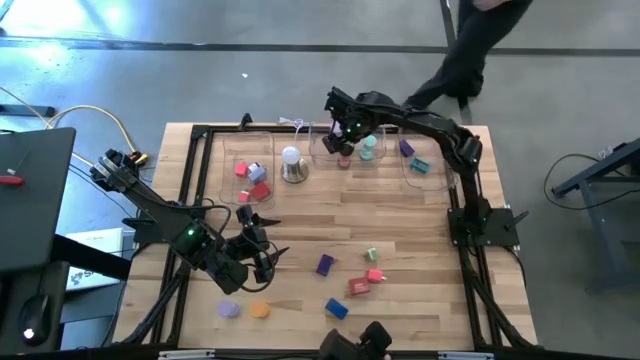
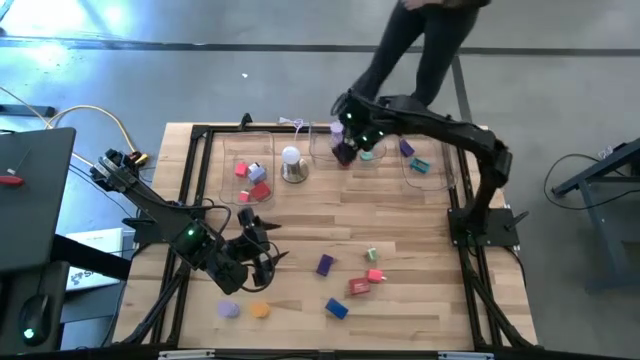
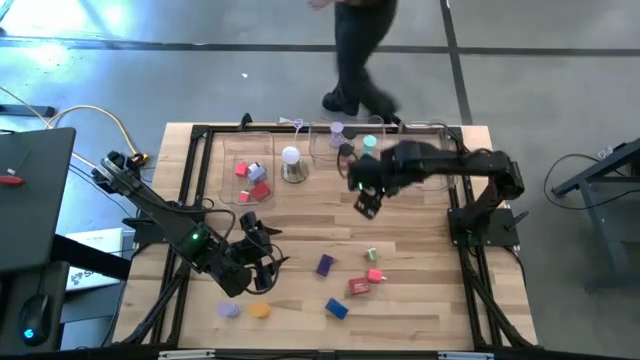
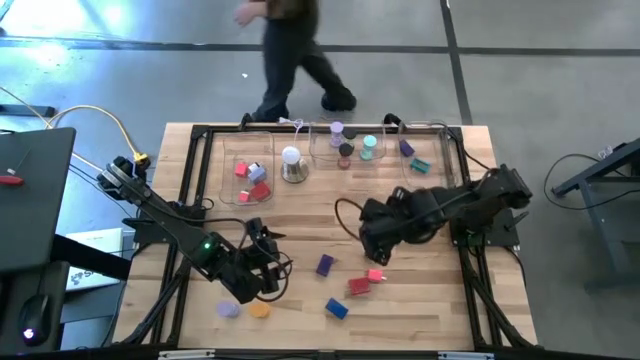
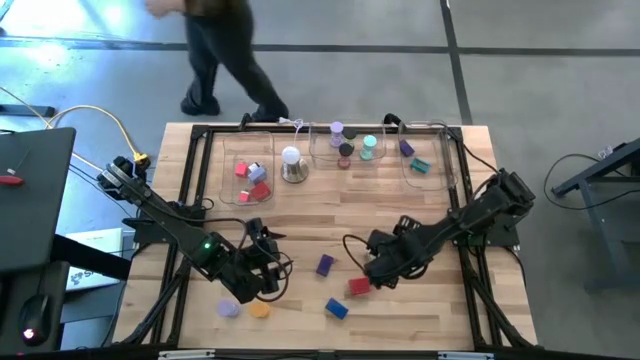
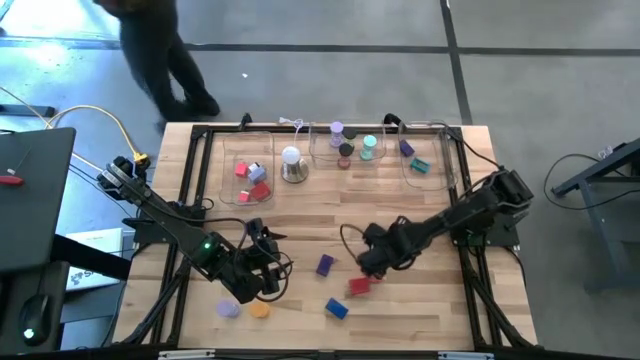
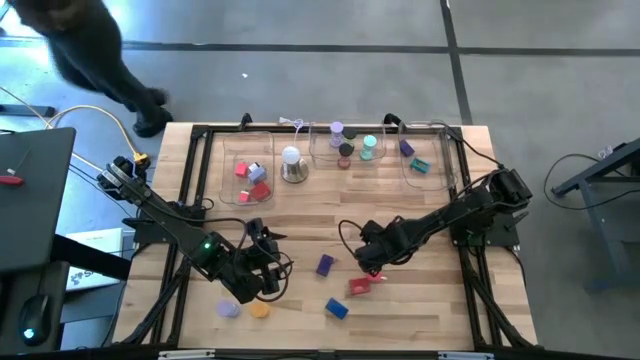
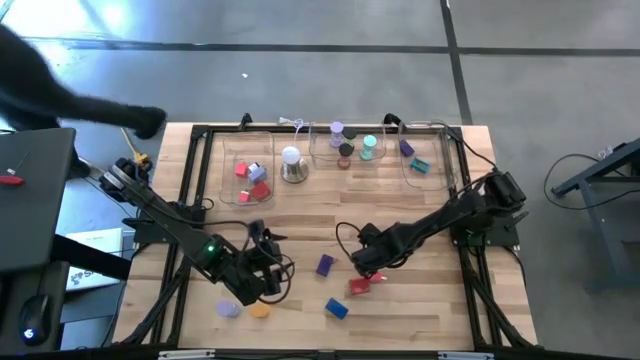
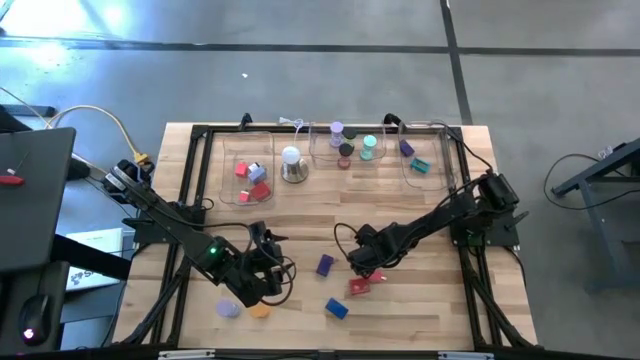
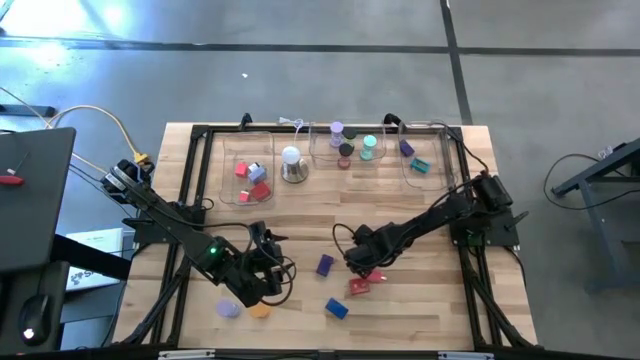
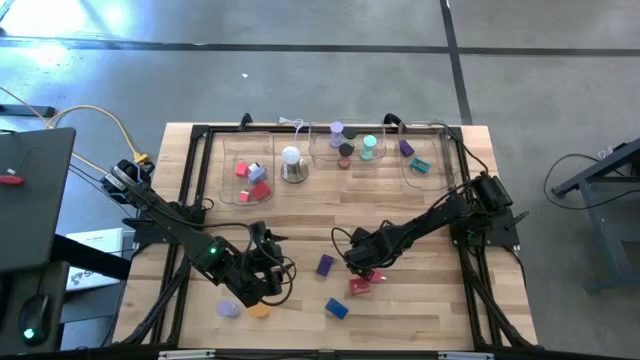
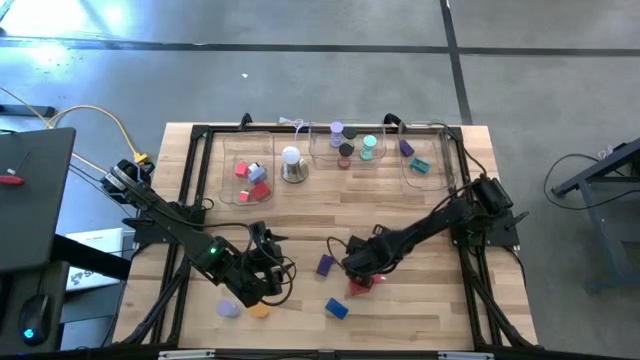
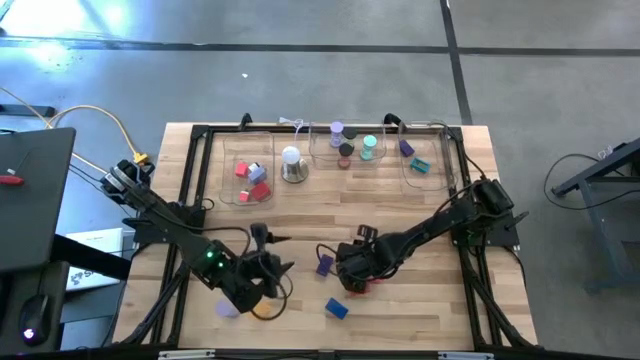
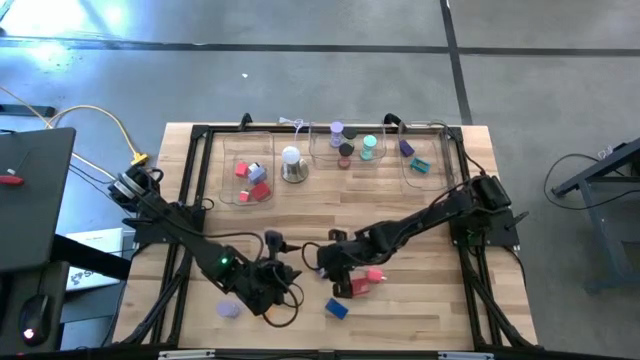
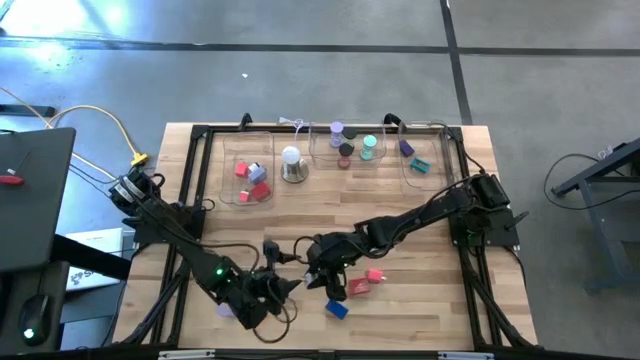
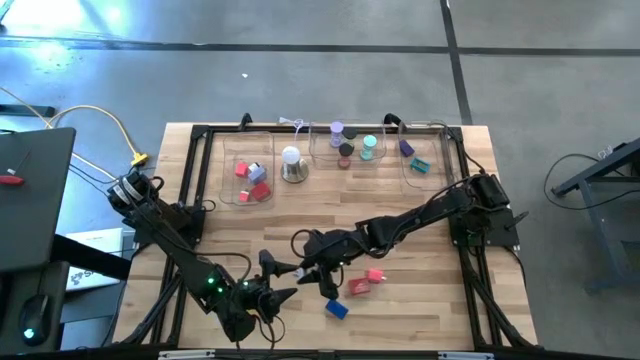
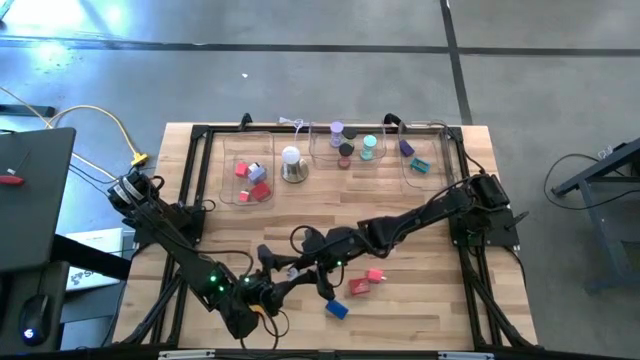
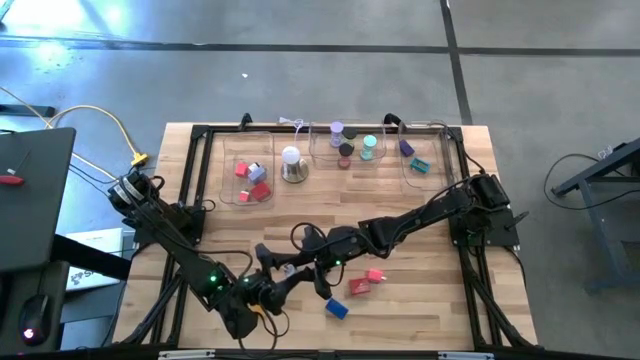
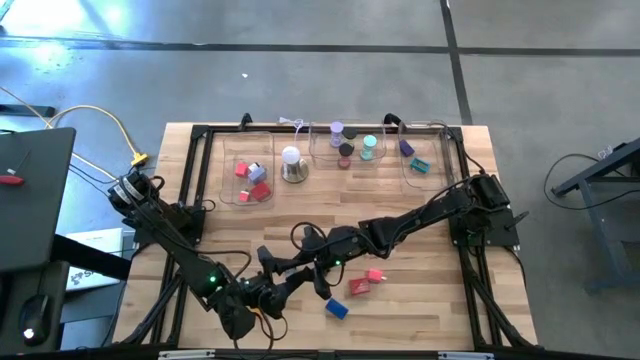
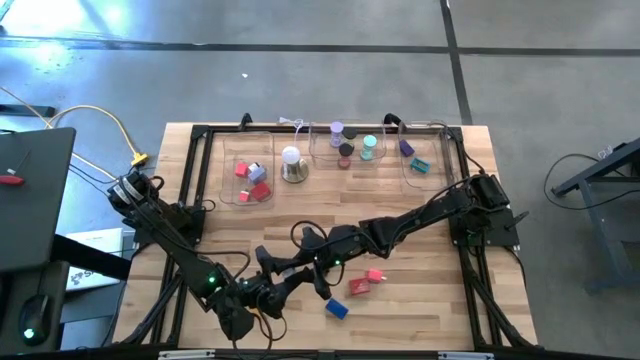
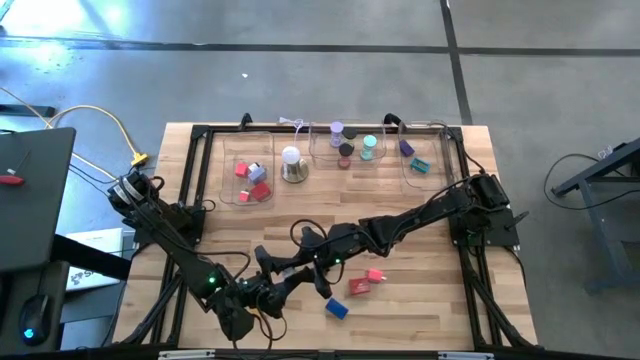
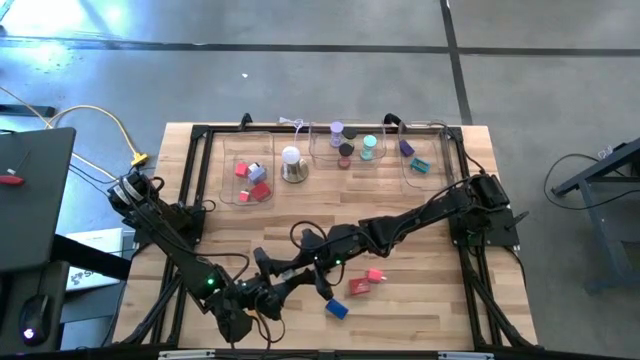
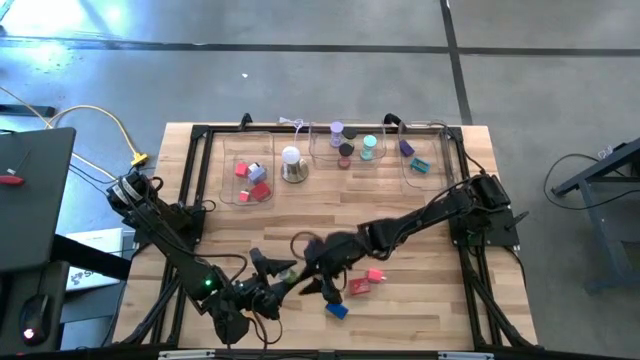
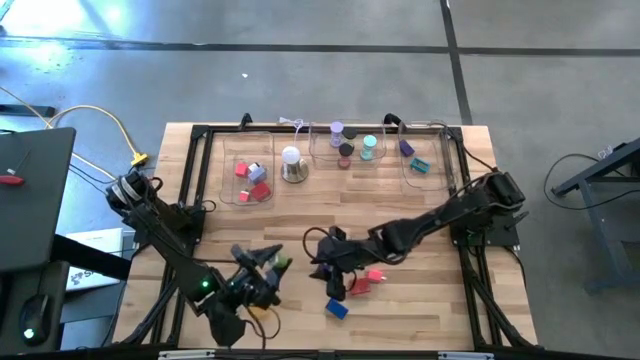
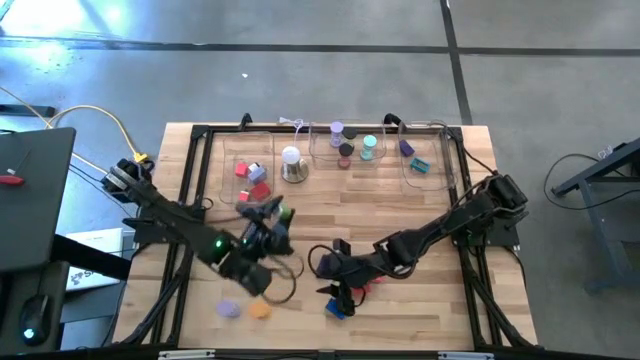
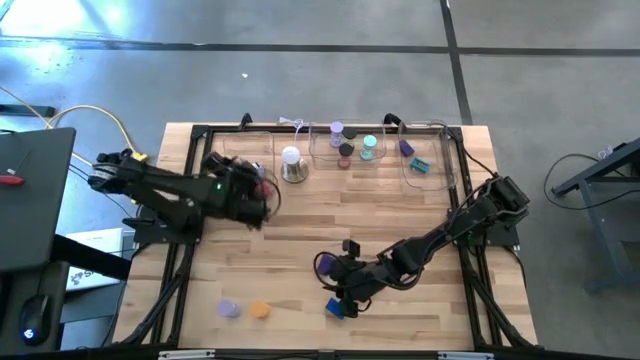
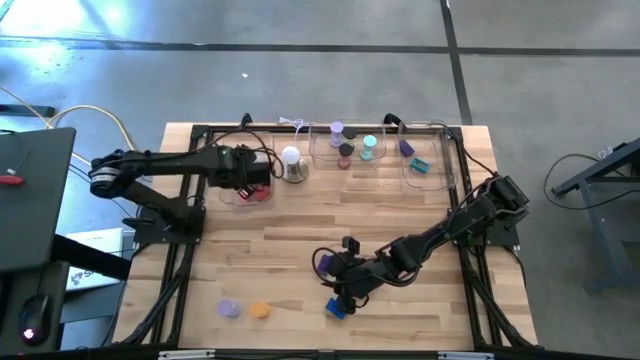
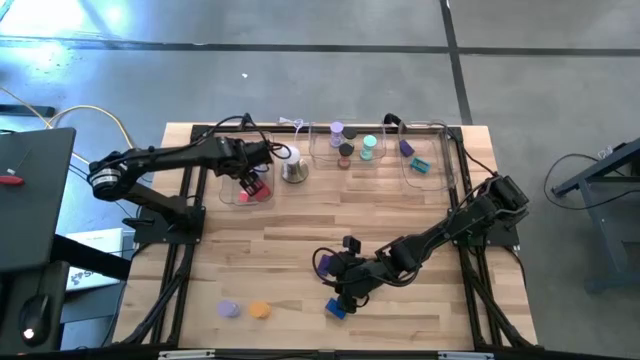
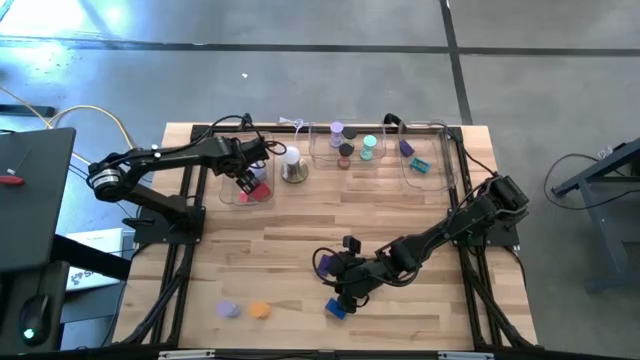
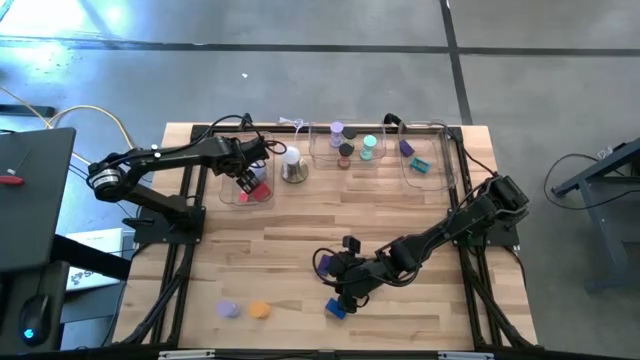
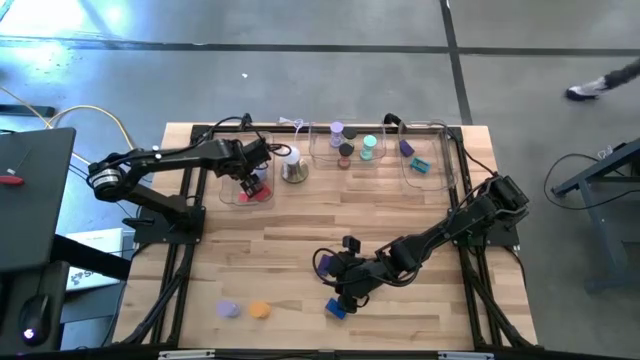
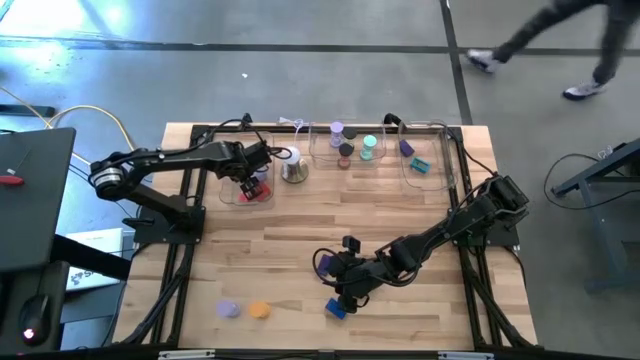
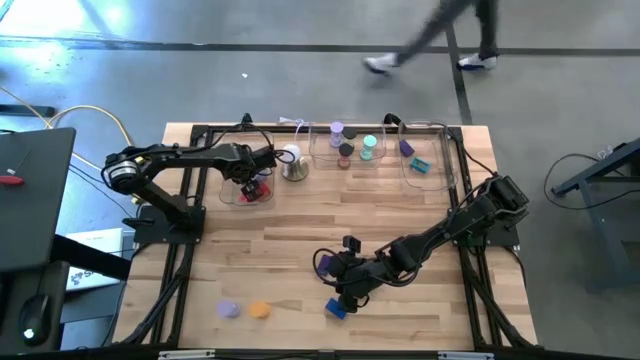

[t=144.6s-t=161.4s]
Task: Pick & Place Office items
Put the green adaptor into the left transparent bin

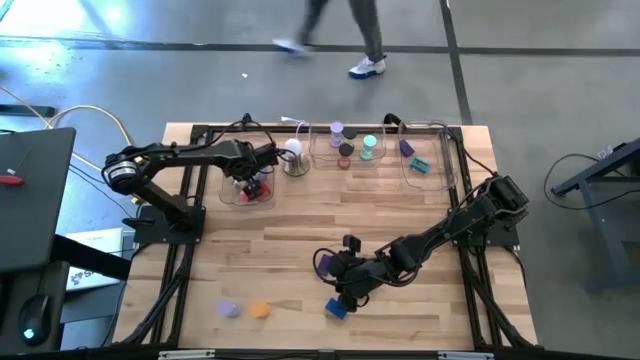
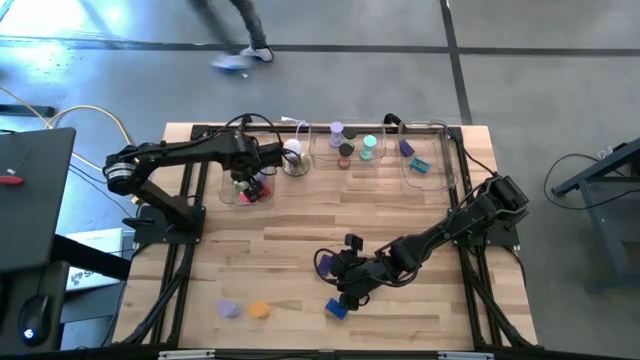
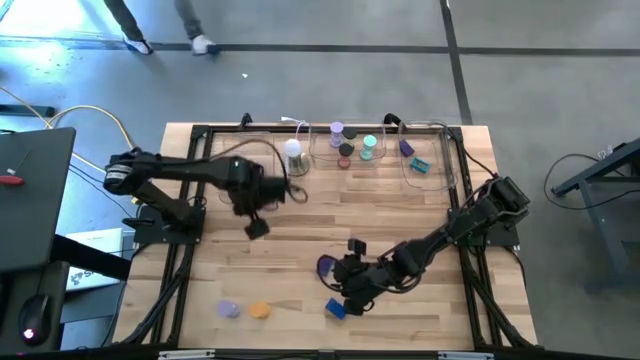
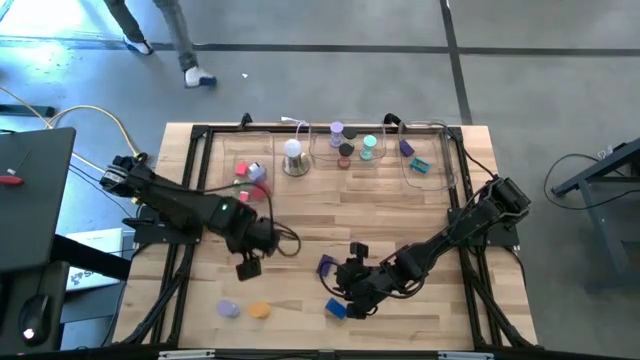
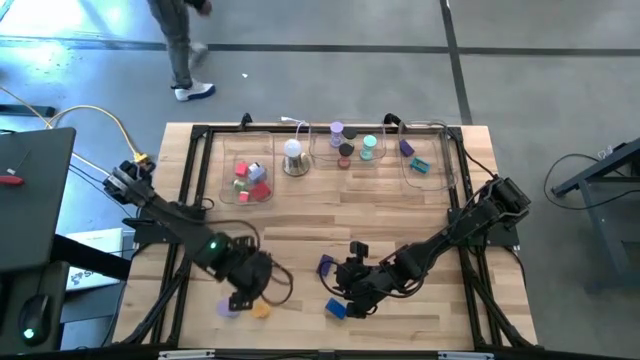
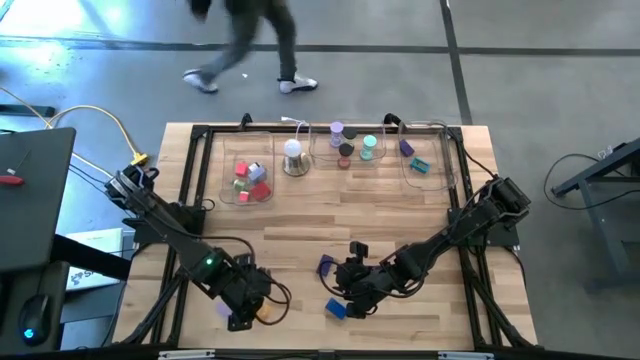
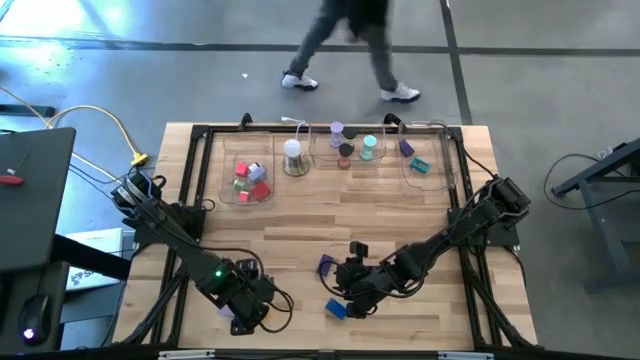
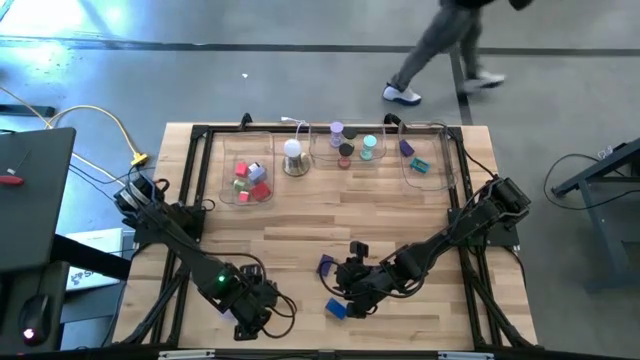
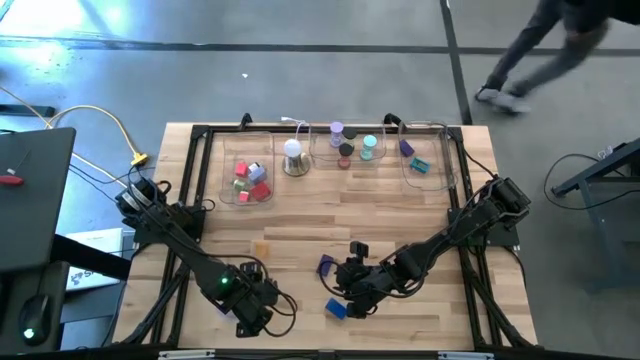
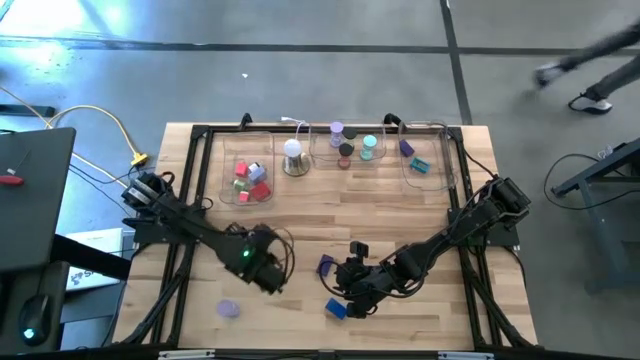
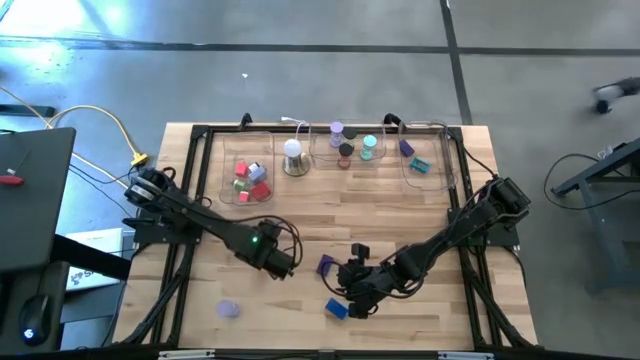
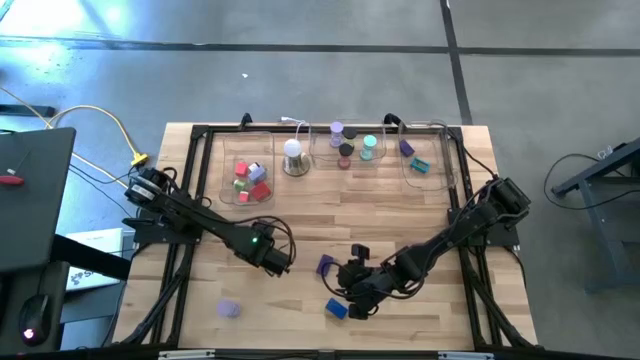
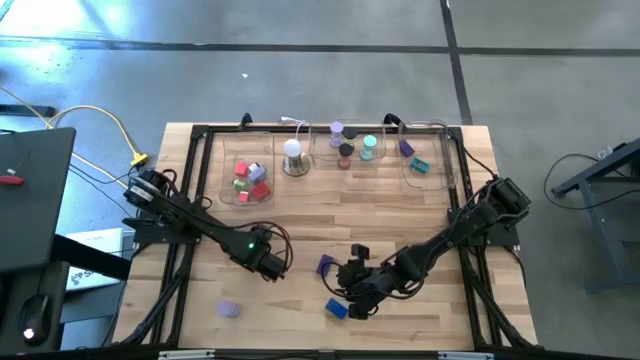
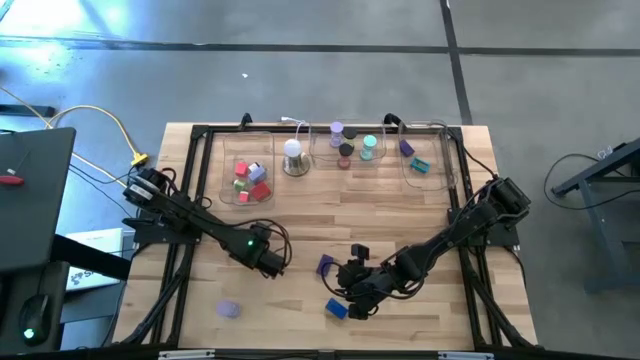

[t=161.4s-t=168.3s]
Put the yellow hourglass into the middle transparent bin
